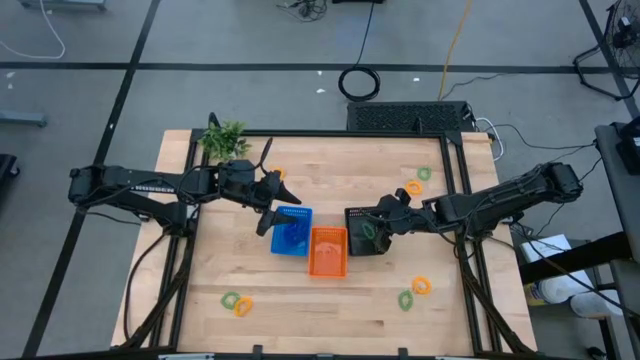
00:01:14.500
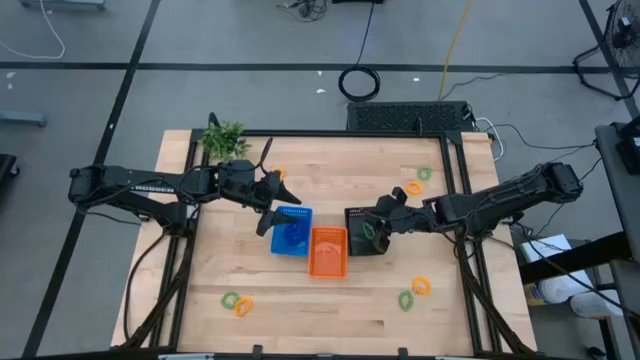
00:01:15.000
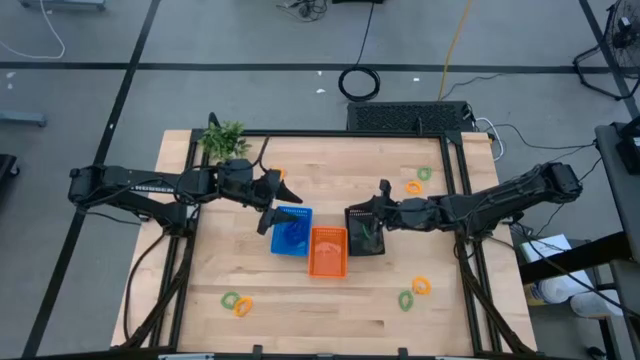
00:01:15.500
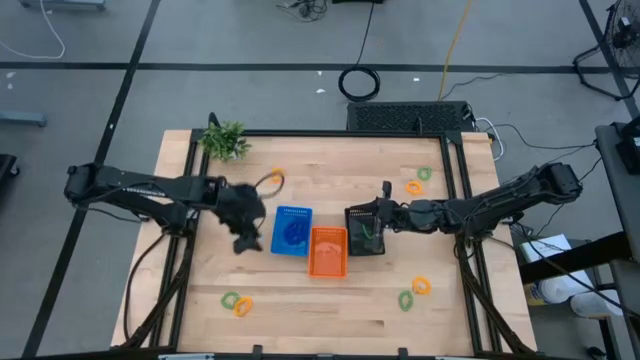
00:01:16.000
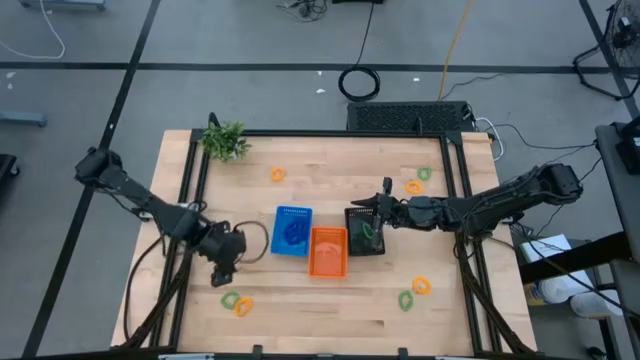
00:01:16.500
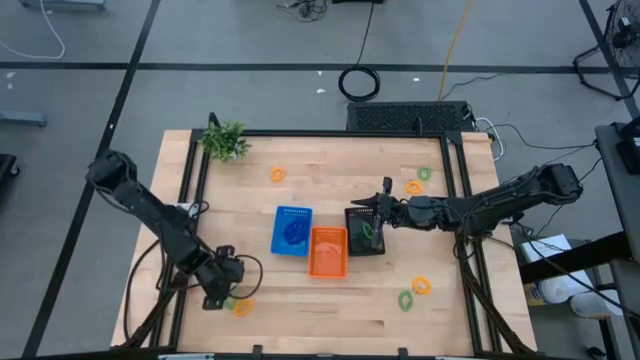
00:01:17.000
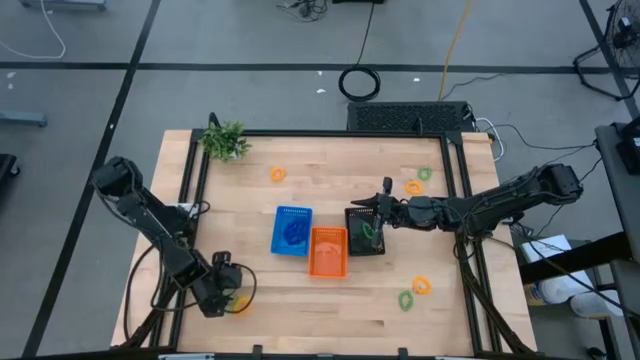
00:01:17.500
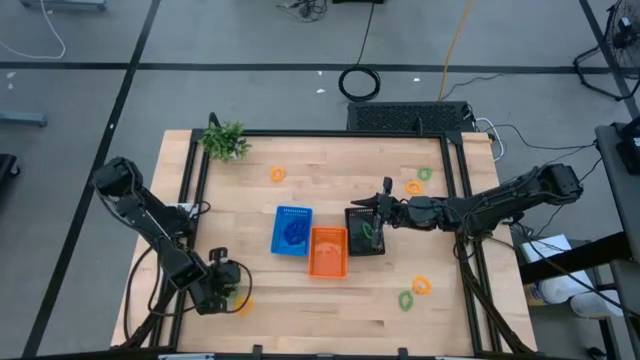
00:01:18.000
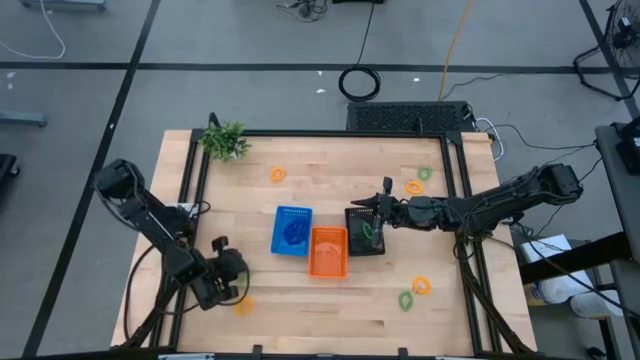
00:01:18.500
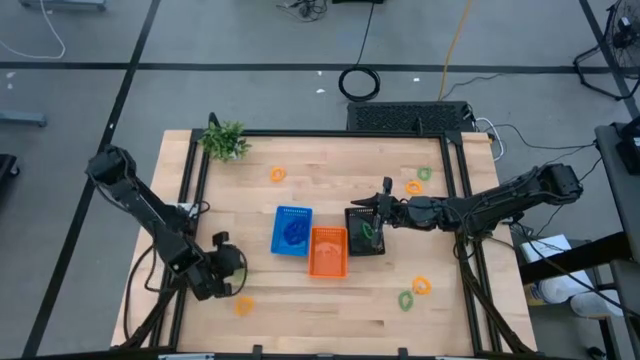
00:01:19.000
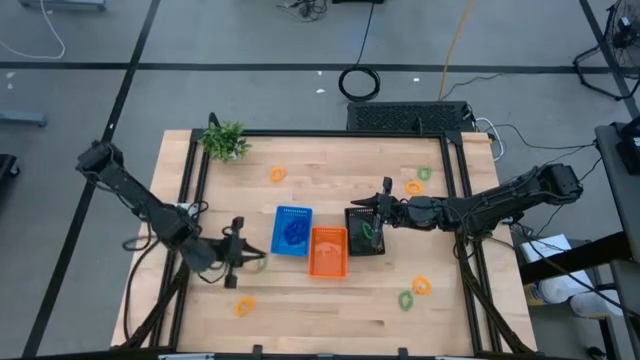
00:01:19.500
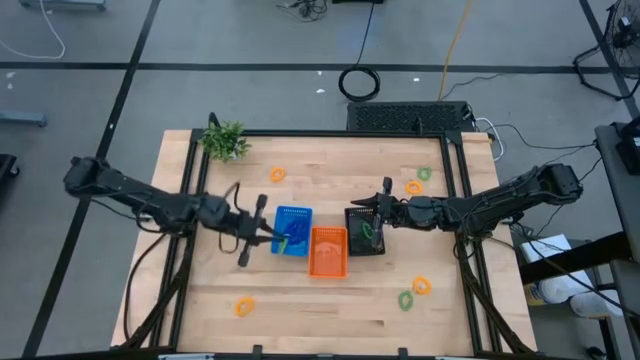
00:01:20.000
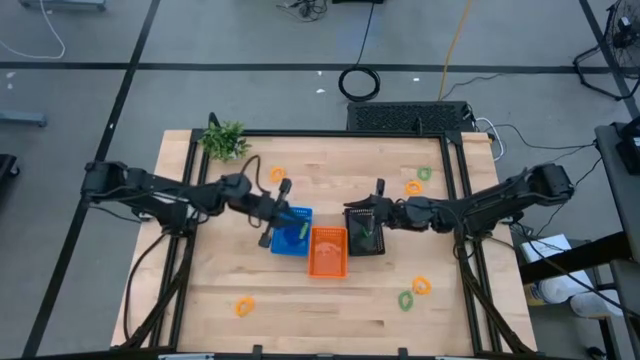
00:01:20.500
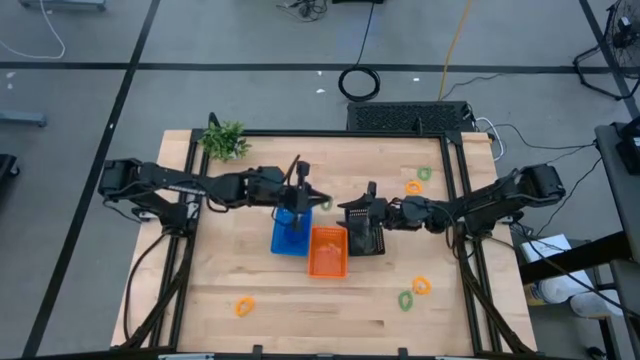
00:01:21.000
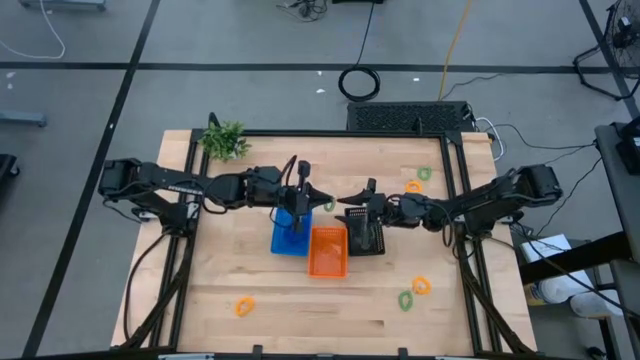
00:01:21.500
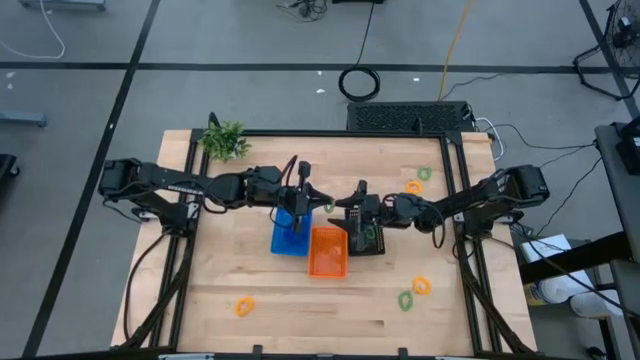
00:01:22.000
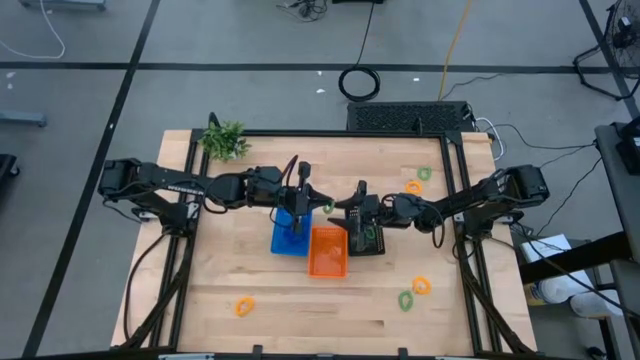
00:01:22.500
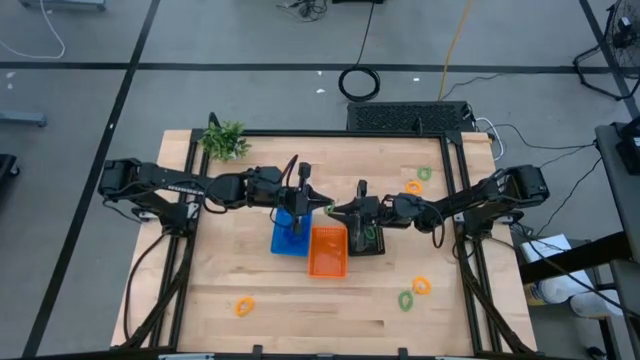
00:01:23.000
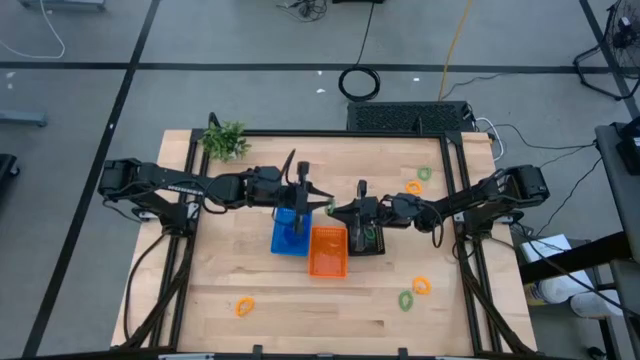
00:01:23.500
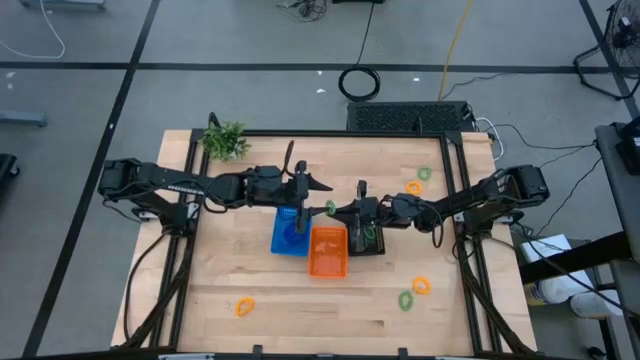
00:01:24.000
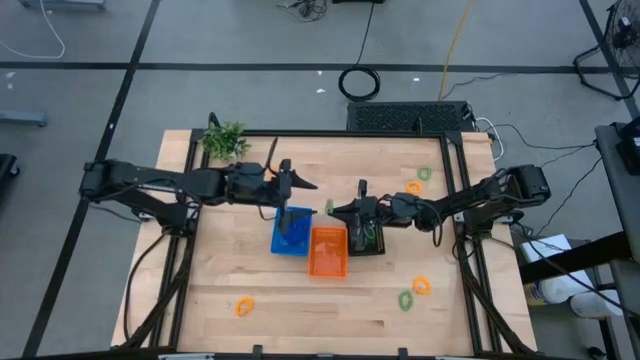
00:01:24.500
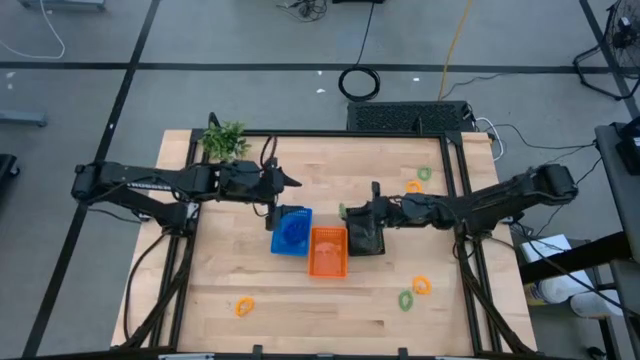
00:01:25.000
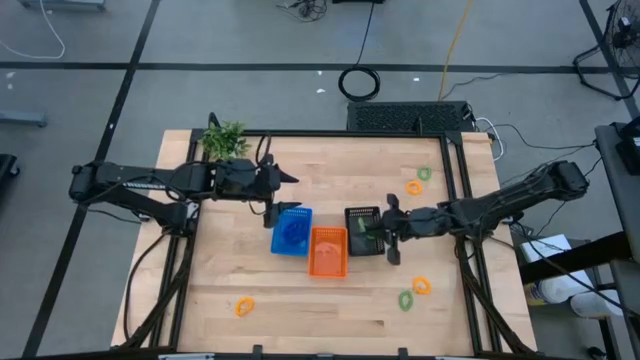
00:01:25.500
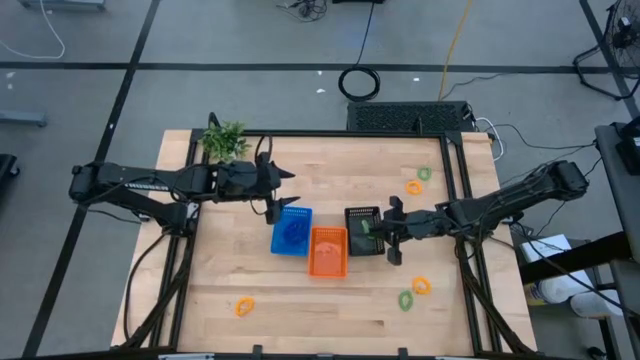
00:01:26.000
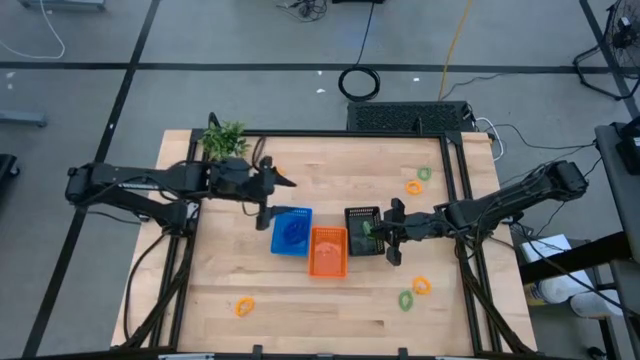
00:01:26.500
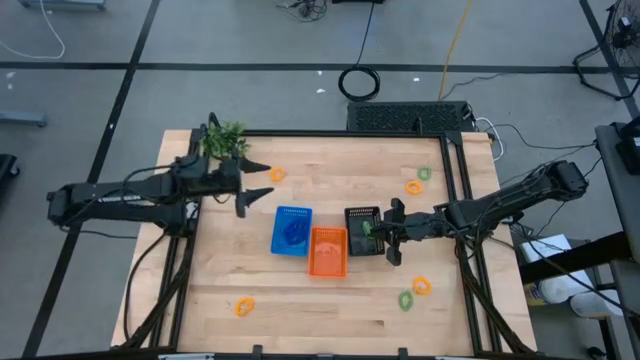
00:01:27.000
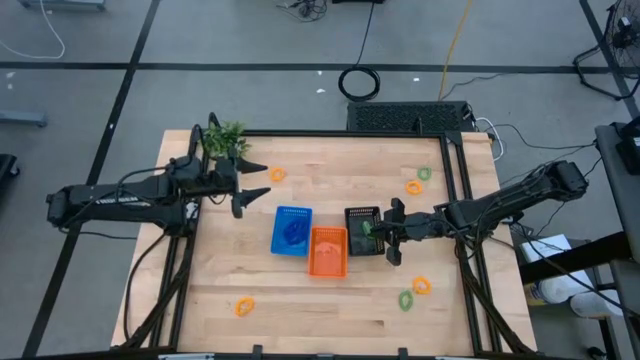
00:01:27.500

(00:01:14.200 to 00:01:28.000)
Task: Sort spring keychains
Put the green spring keychain into the black bin

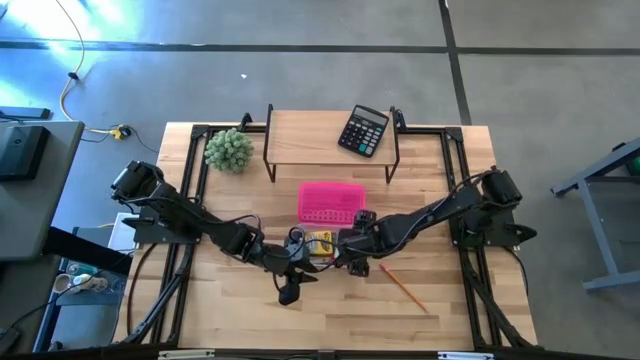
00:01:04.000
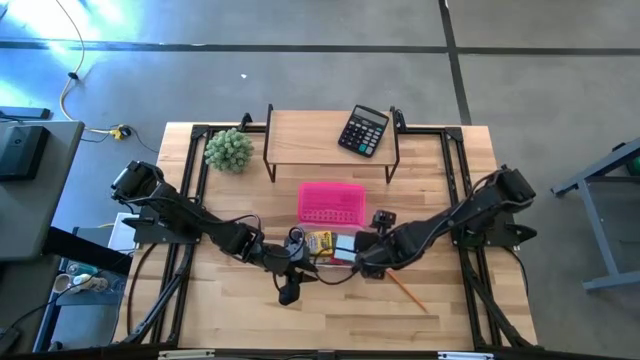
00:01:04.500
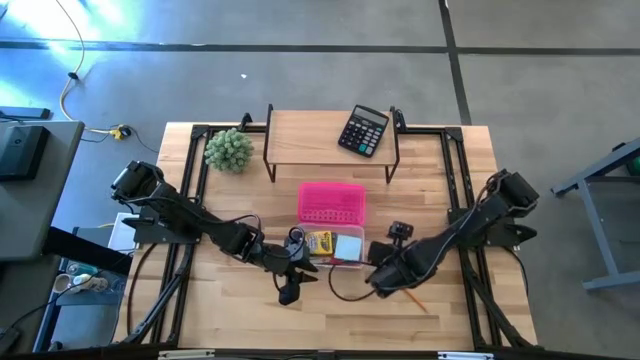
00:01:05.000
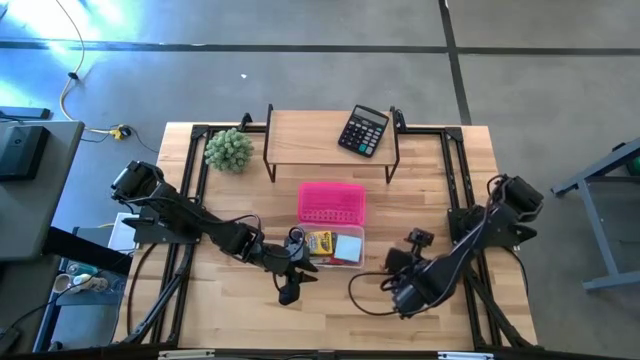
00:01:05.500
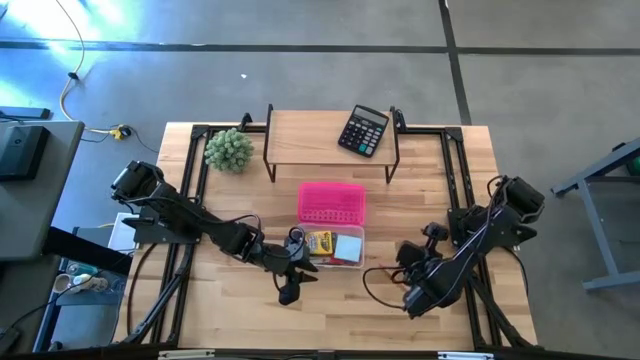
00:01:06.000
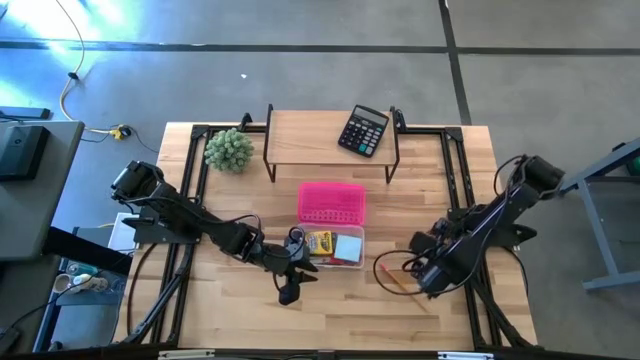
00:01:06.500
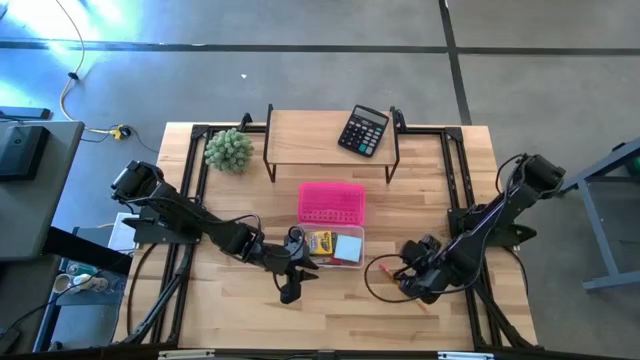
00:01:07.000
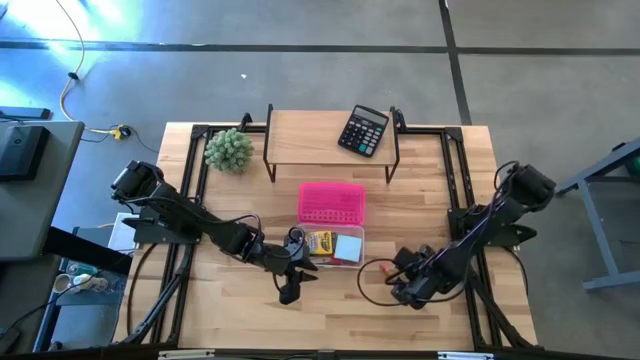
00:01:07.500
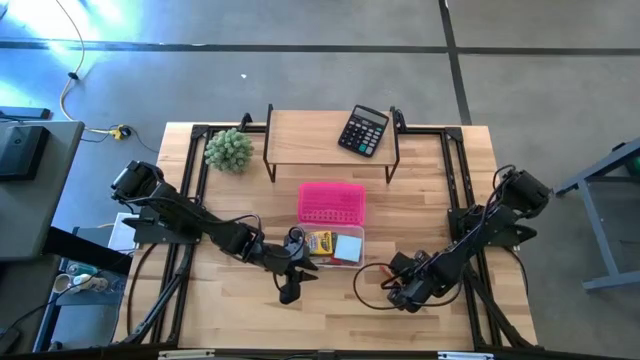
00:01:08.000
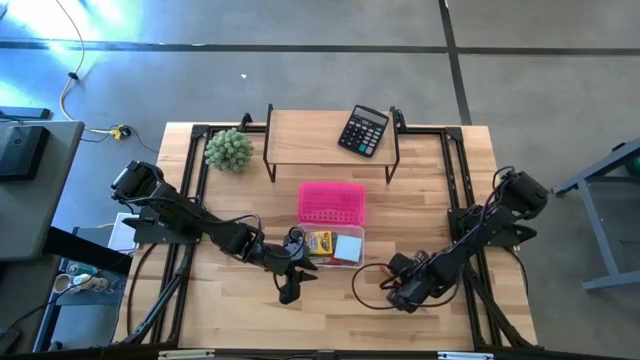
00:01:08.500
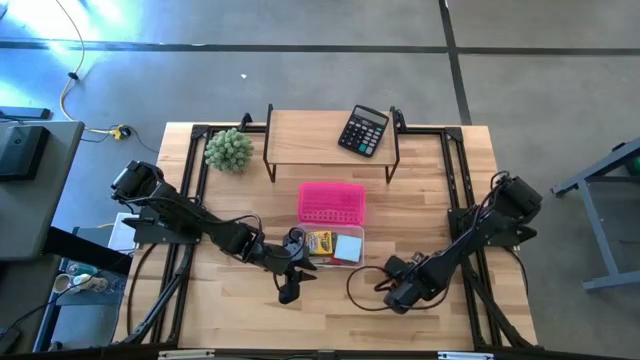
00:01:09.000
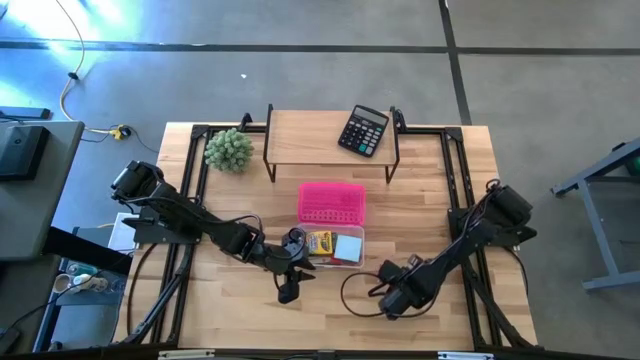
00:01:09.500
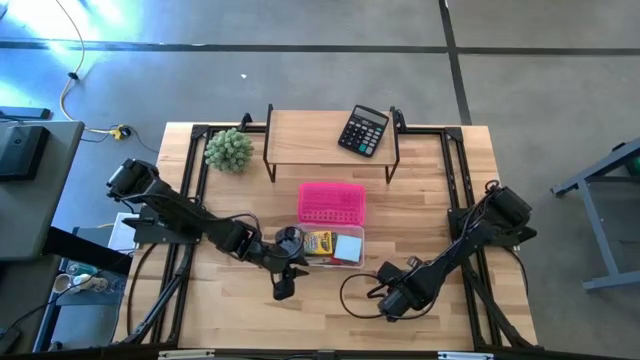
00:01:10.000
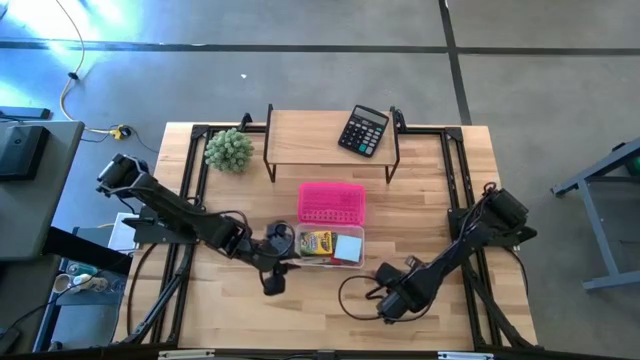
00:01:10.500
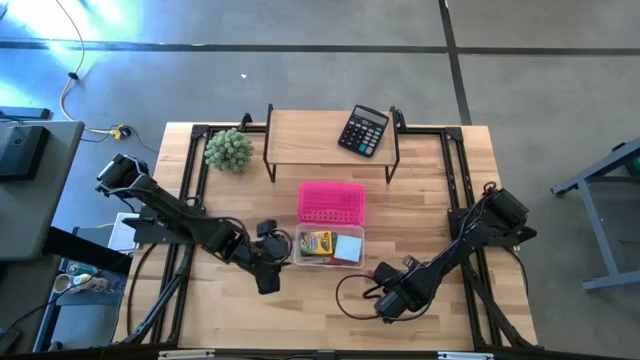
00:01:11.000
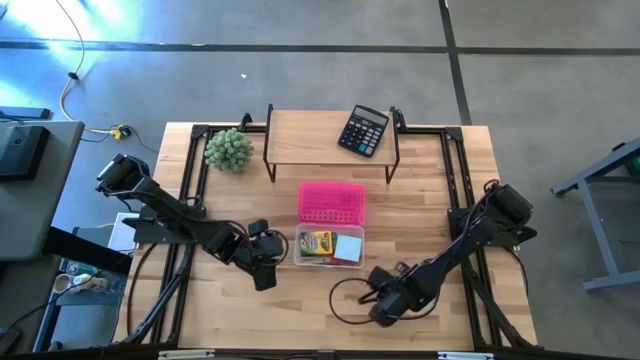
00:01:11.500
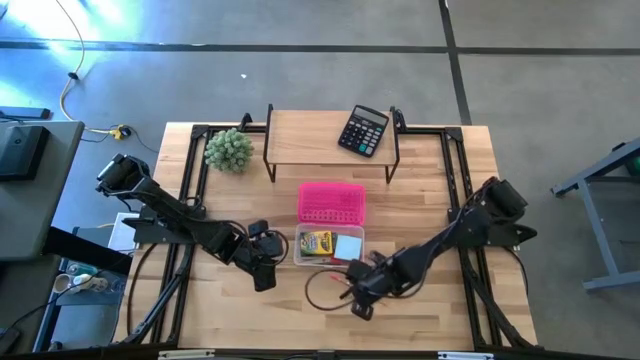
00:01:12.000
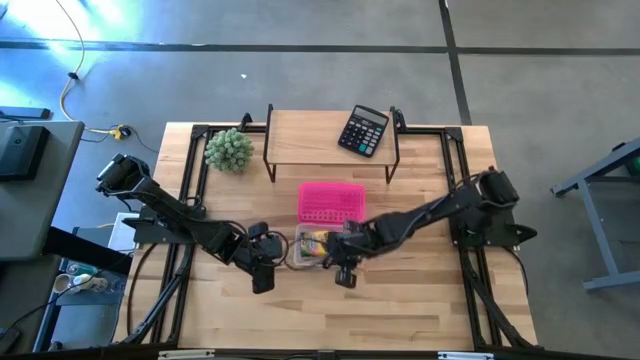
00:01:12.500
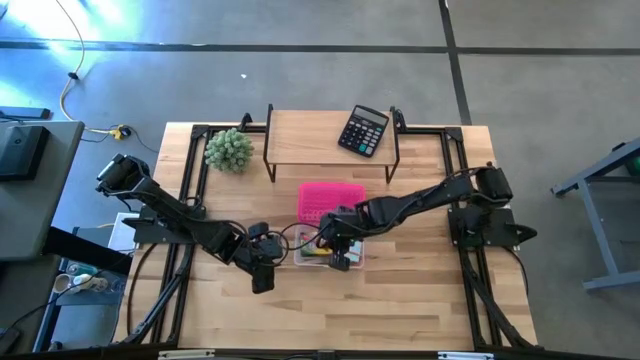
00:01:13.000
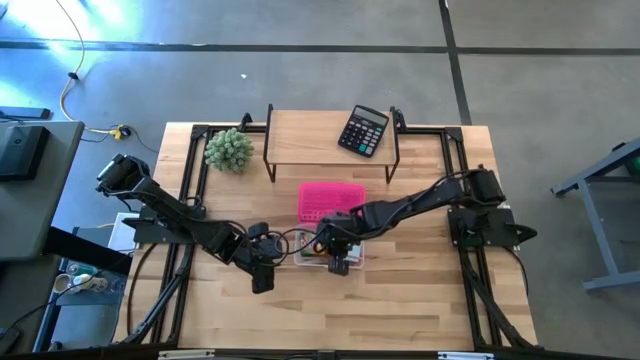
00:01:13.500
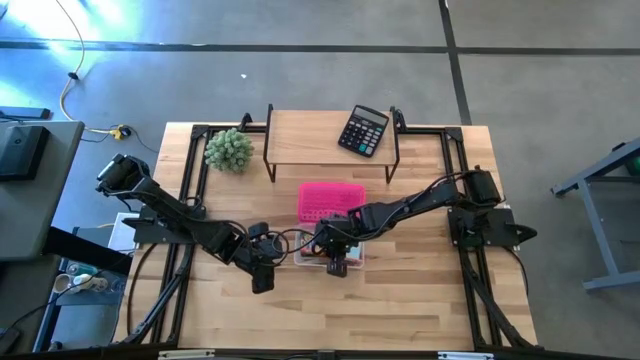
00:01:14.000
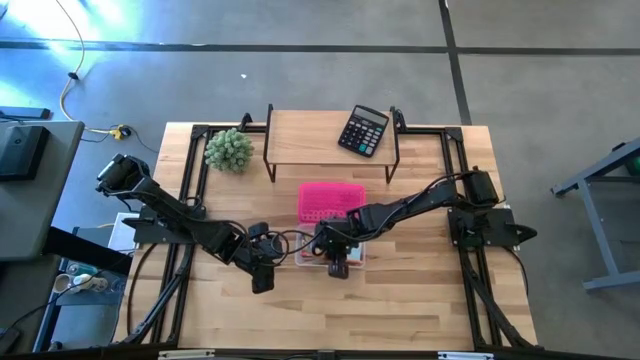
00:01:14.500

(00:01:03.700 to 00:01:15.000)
Task: Pack school essentials
Put the orange pencil into the pink supply box
